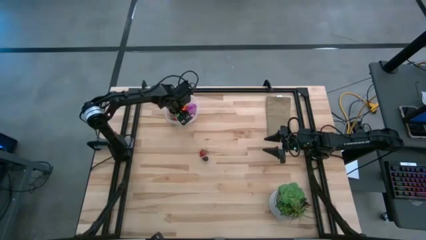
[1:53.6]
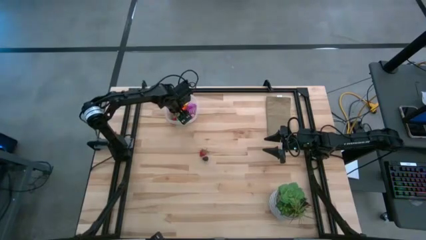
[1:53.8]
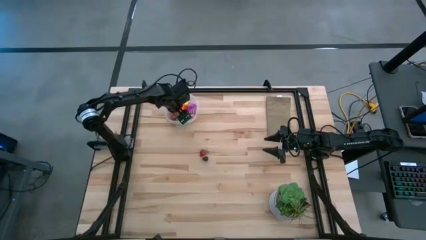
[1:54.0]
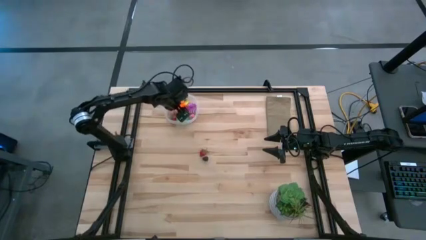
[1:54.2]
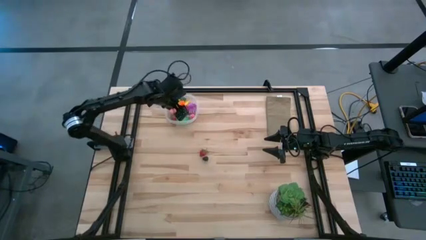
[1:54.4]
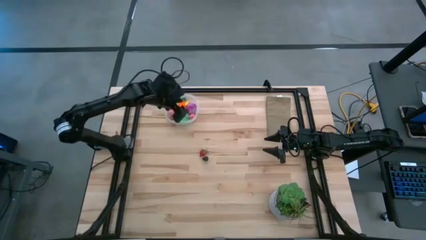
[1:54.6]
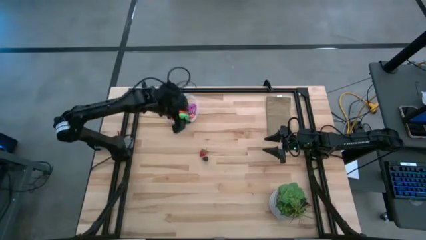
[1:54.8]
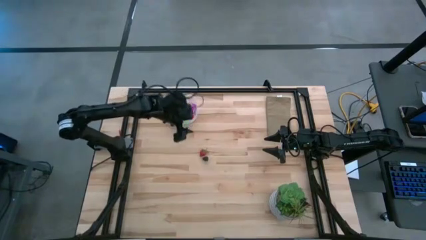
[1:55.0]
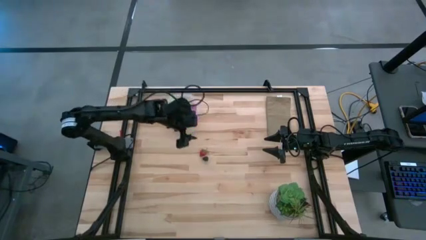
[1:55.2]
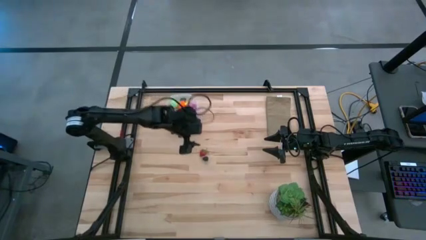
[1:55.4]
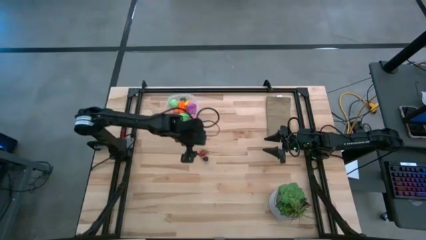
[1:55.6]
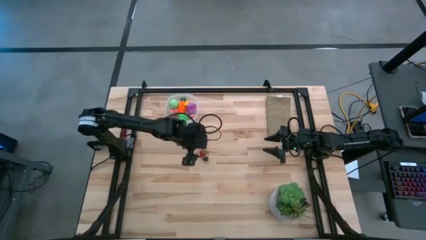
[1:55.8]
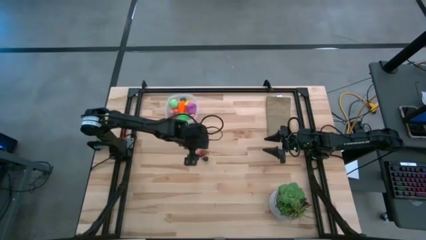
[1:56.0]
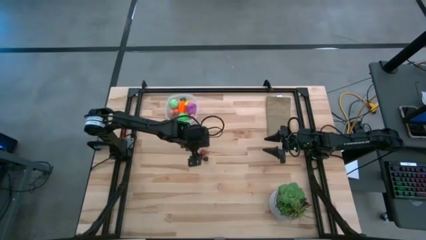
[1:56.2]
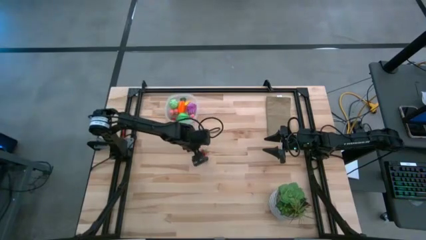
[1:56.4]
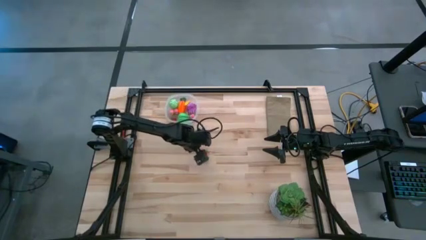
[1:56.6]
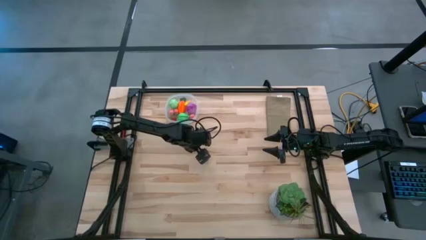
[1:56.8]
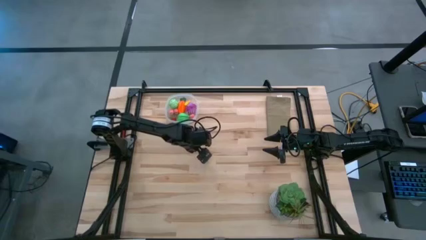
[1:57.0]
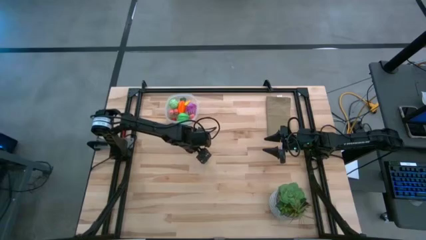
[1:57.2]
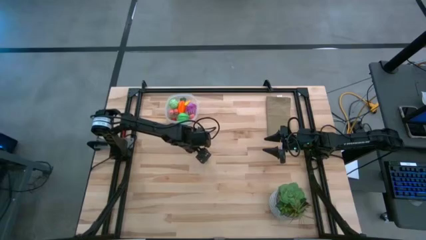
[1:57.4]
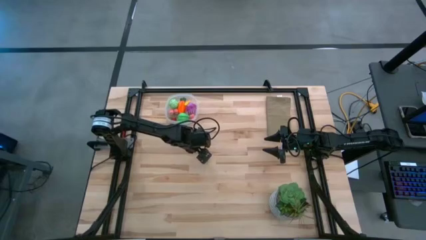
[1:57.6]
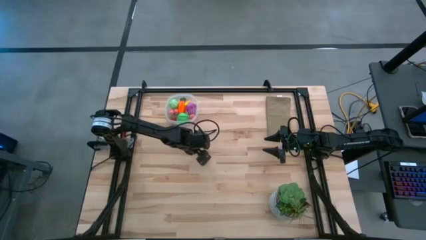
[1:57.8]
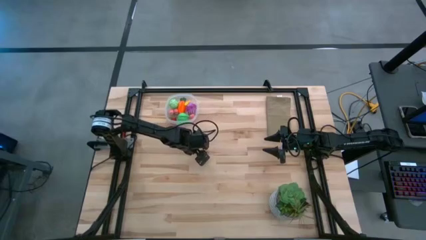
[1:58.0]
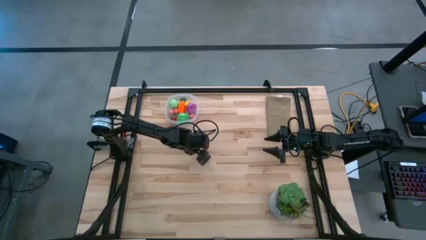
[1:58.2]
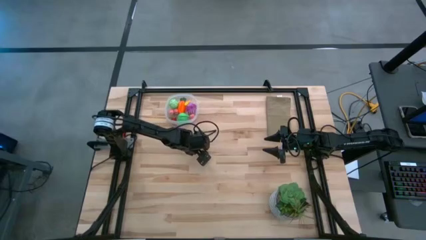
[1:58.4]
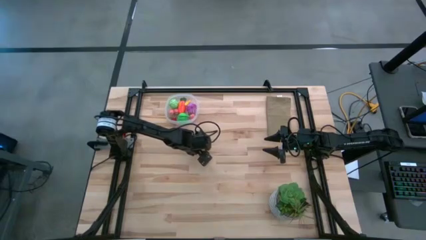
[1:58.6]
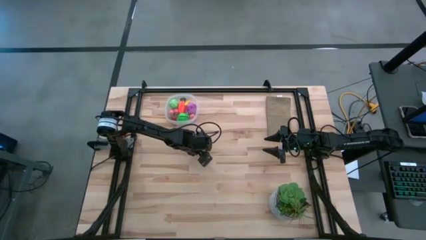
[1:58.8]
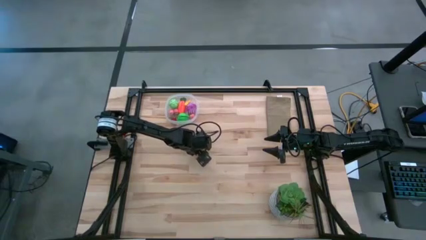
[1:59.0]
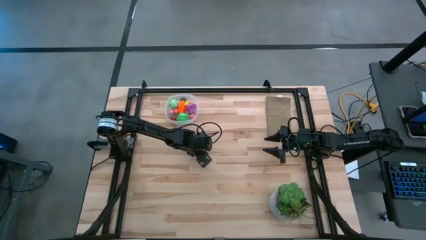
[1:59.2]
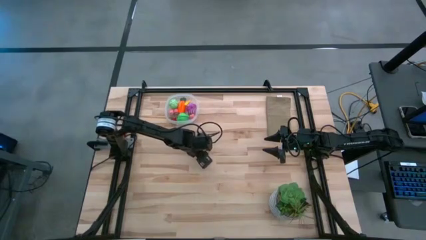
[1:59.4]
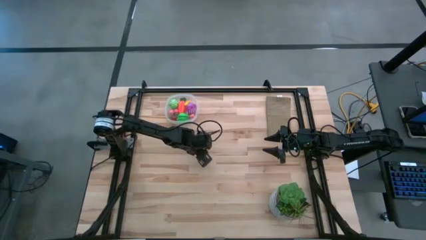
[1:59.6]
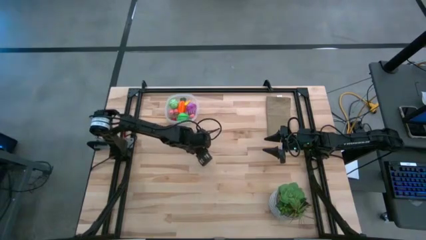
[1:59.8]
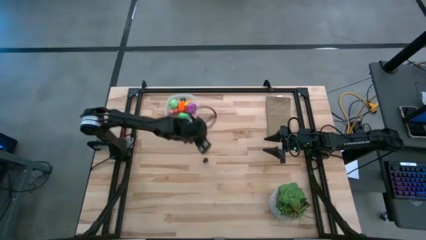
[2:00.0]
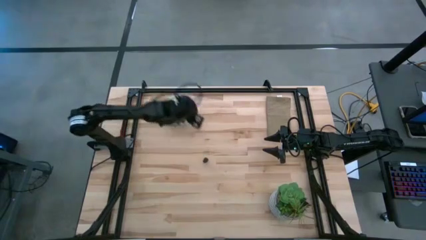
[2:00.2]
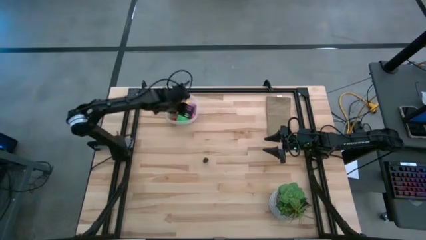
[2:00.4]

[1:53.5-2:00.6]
Task: Pick and placing Produce into tupperware
Put the strawberry into the transparent bin

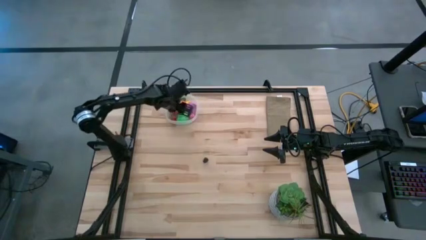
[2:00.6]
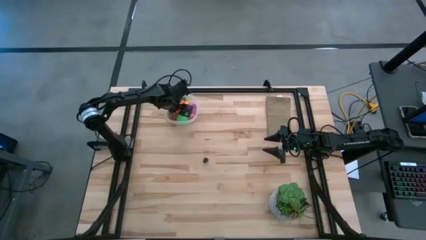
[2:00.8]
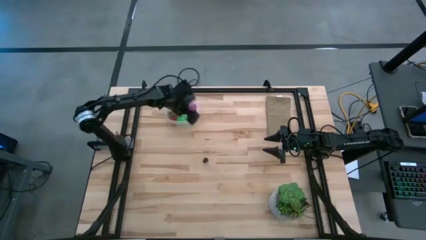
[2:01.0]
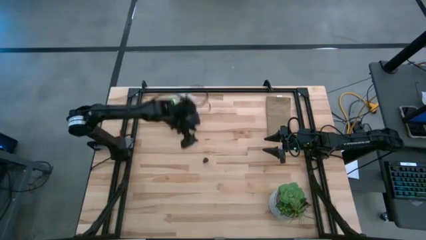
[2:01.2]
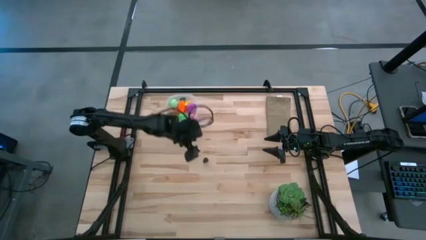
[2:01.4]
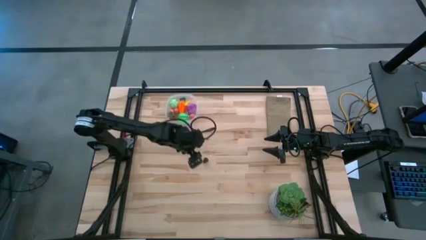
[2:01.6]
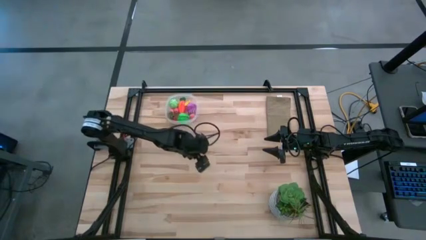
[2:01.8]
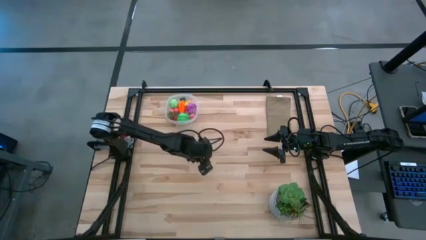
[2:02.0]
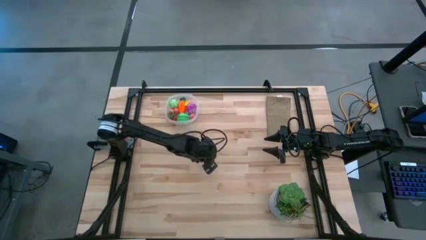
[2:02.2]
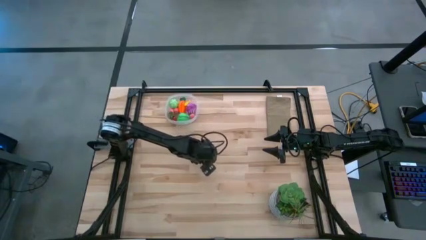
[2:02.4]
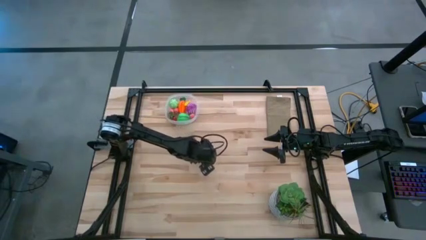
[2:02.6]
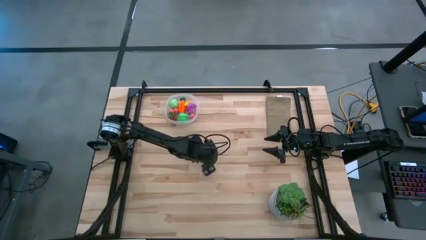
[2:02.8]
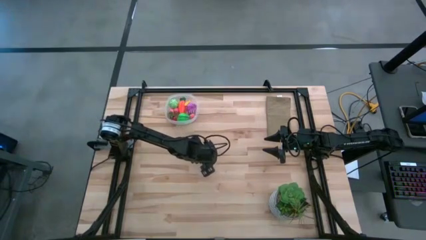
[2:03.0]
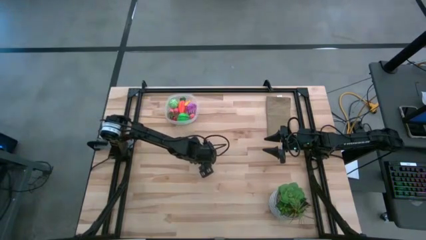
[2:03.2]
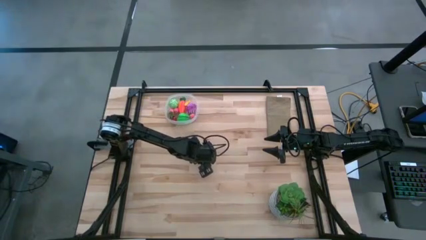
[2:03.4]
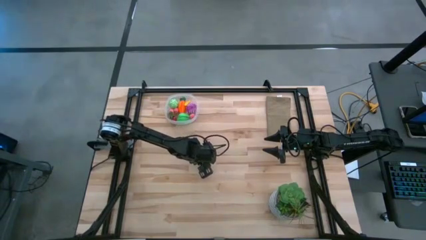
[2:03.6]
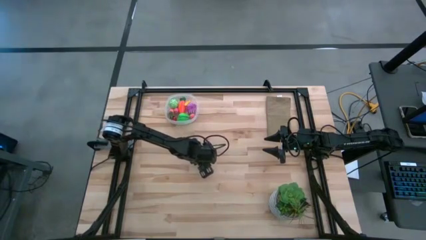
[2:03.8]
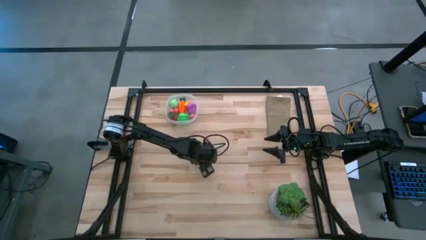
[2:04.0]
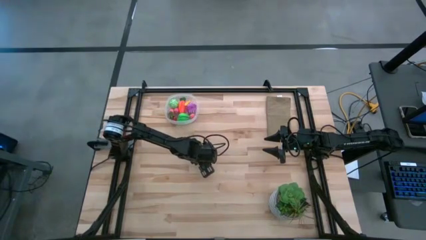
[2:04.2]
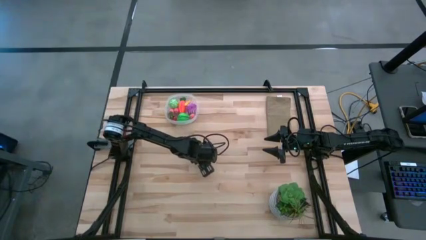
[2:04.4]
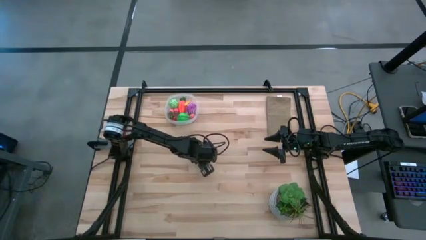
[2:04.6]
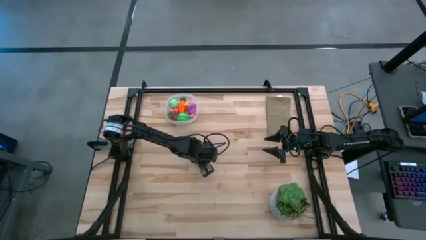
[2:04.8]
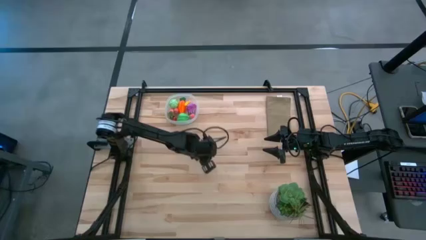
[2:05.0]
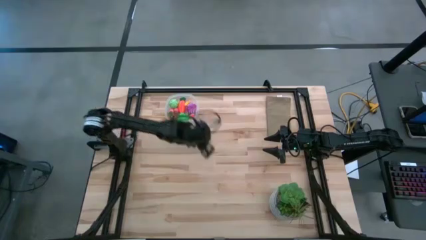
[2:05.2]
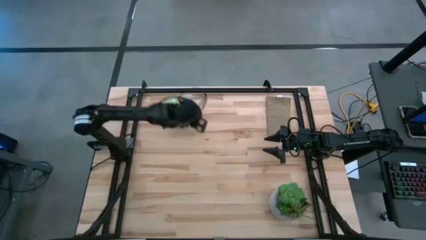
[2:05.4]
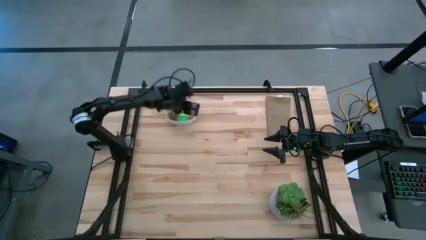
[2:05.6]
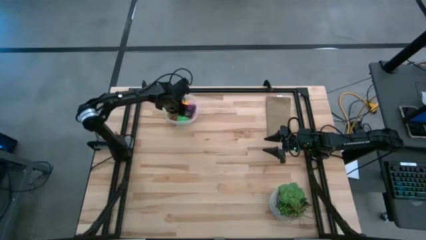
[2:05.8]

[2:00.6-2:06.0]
Put the blackberry into the transparent bin

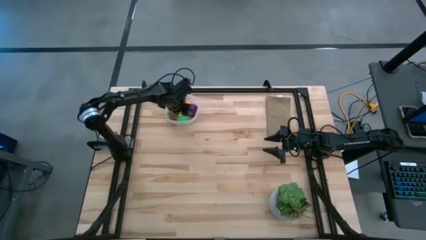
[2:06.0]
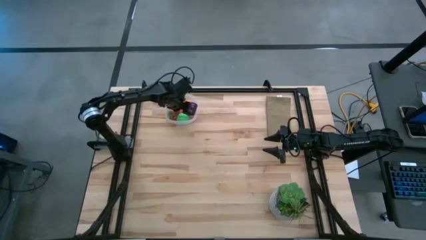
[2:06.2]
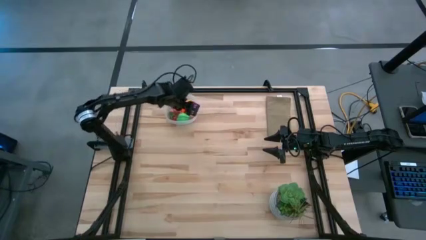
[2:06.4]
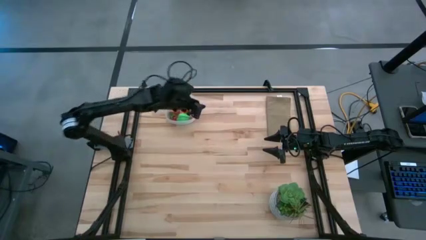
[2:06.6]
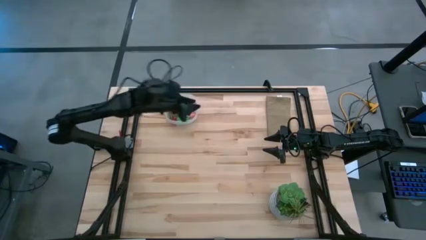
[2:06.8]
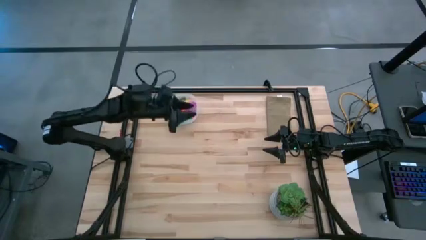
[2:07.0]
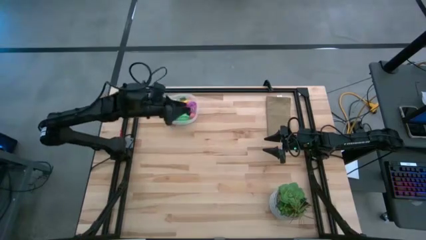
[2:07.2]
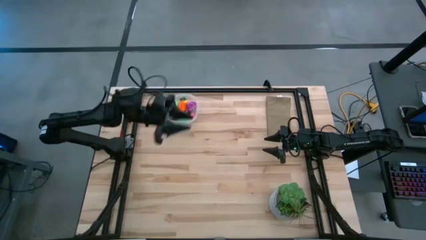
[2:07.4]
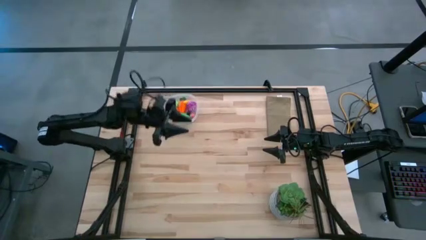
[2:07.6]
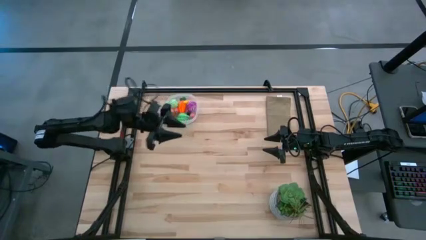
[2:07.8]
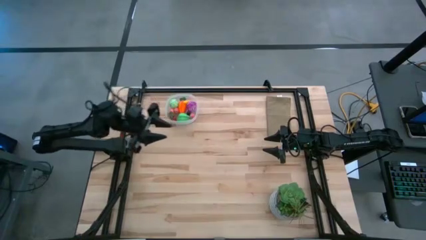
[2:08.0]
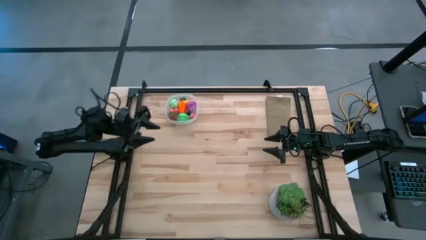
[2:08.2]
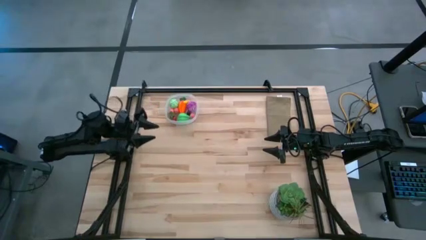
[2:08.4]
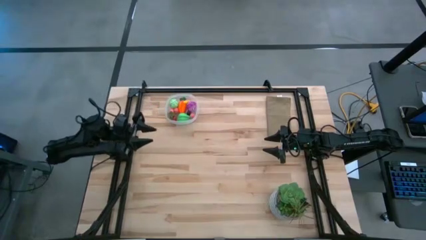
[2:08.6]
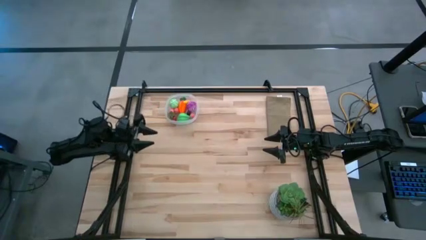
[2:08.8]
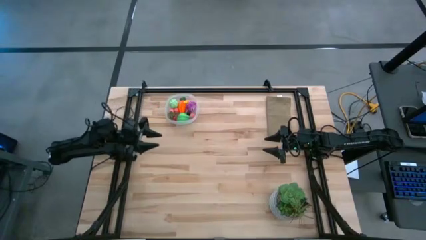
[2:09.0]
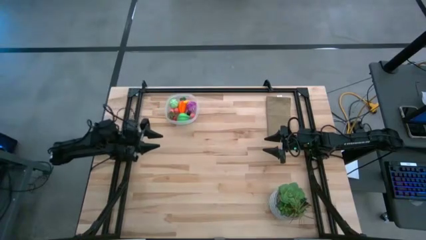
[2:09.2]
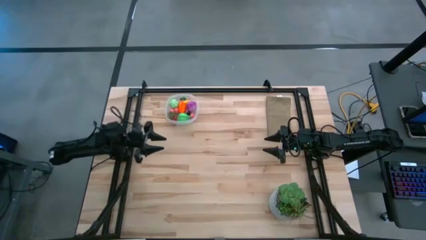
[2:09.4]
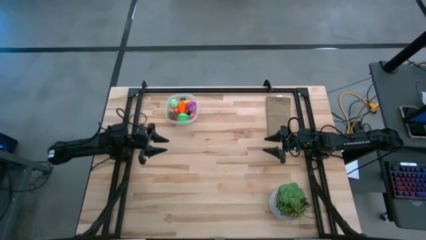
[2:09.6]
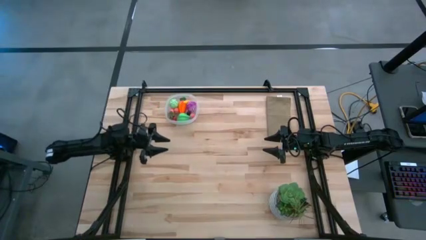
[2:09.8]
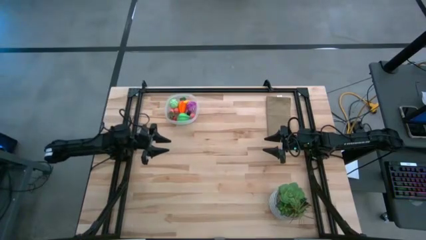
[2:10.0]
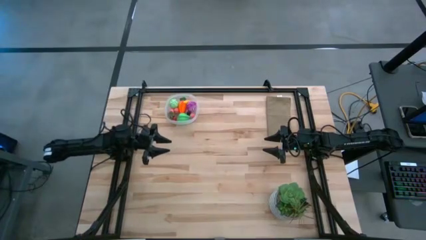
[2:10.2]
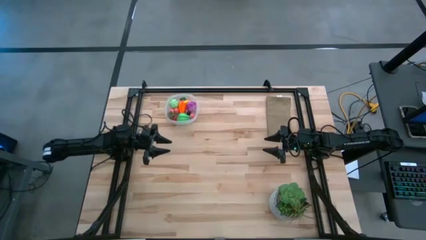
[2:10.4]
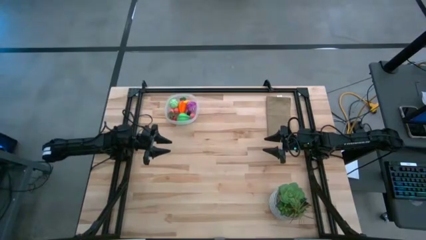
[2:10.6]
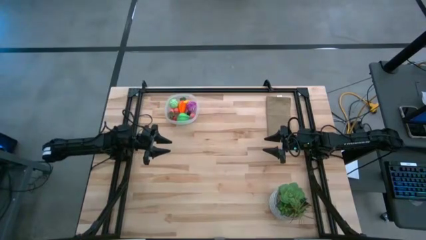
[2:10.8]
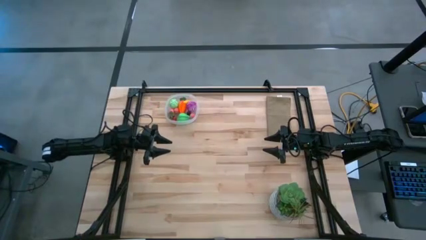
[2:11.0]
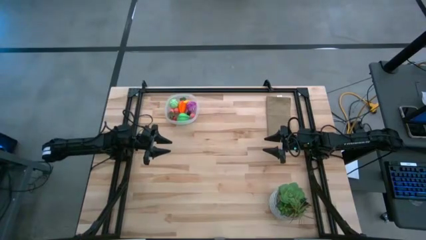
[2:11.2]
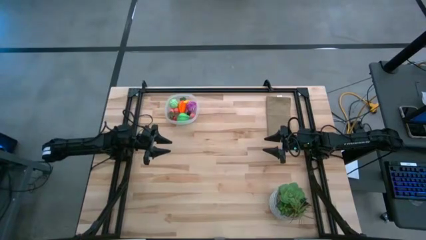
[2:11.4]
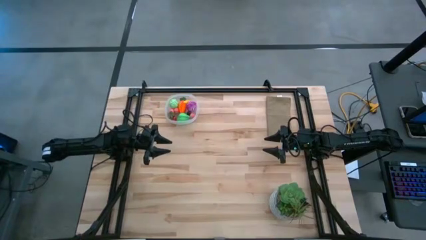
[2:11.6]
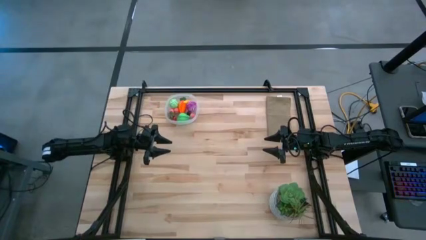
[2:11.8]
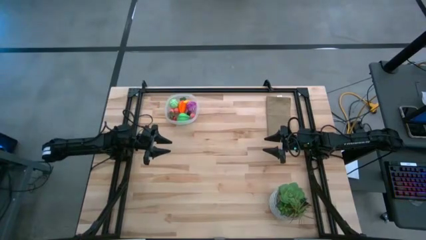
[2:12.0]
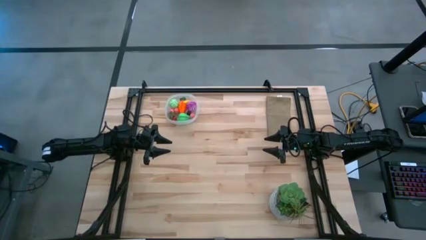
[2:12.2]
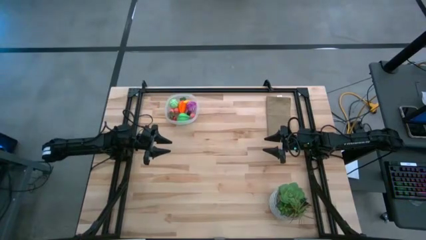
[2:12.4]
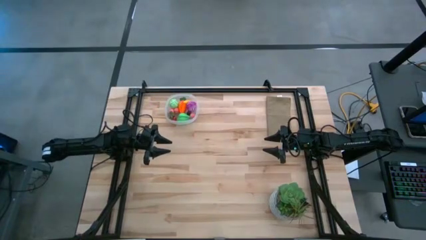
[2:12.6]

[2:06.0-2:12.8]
Return to Home Position
